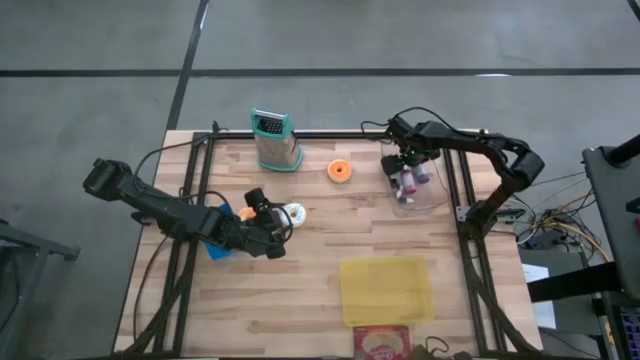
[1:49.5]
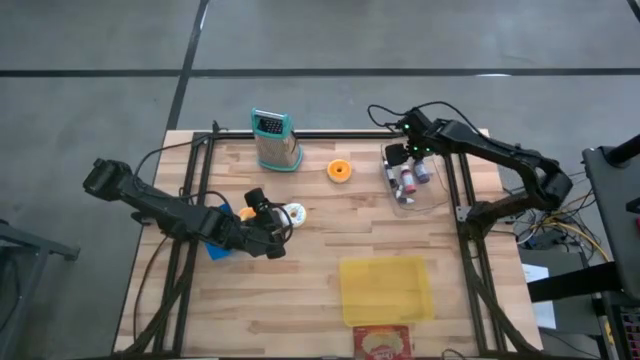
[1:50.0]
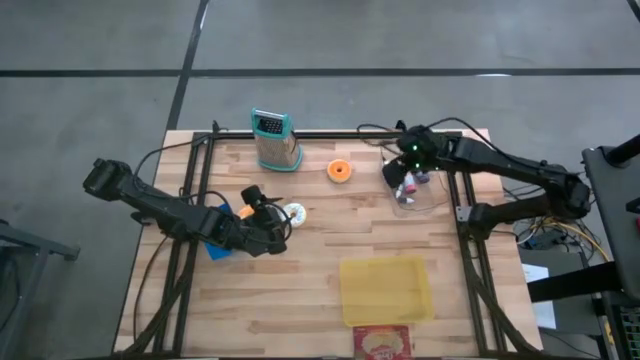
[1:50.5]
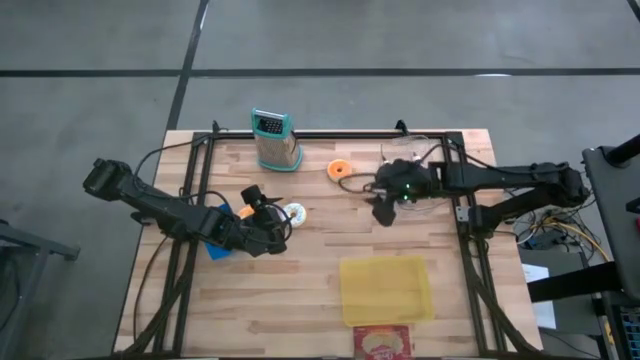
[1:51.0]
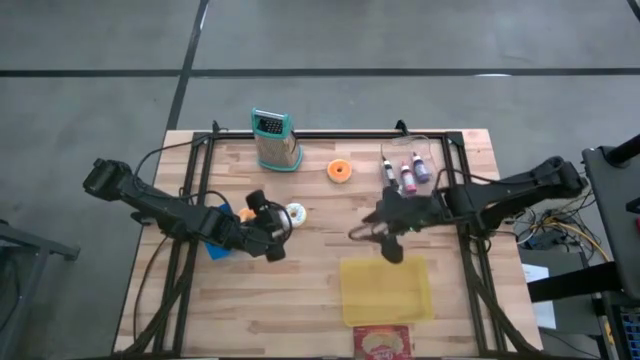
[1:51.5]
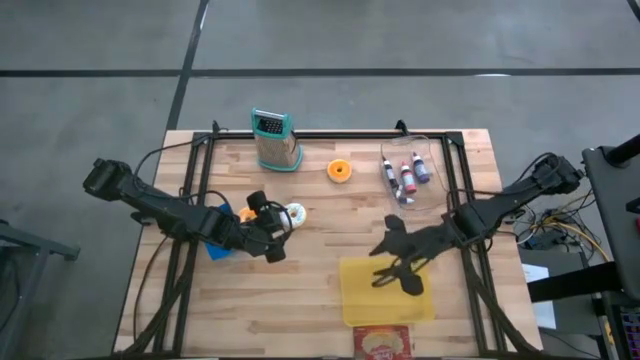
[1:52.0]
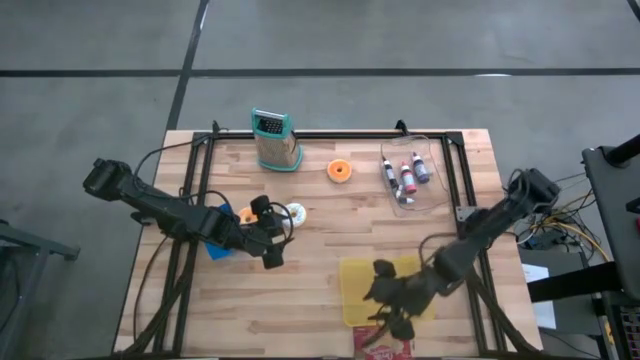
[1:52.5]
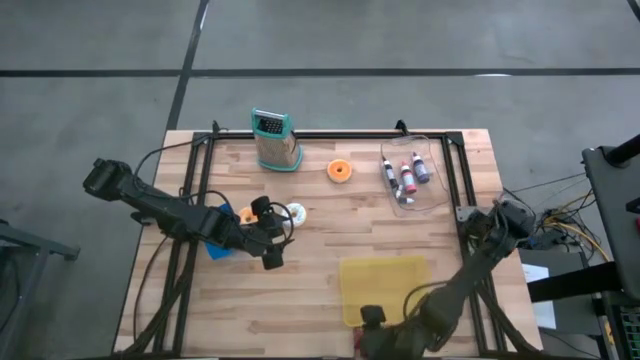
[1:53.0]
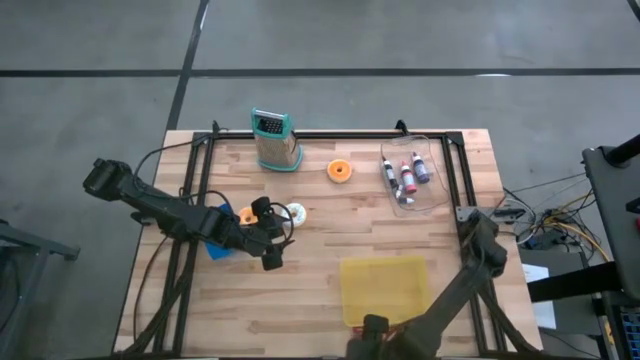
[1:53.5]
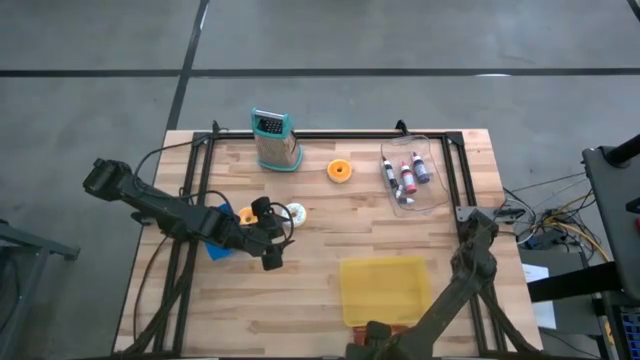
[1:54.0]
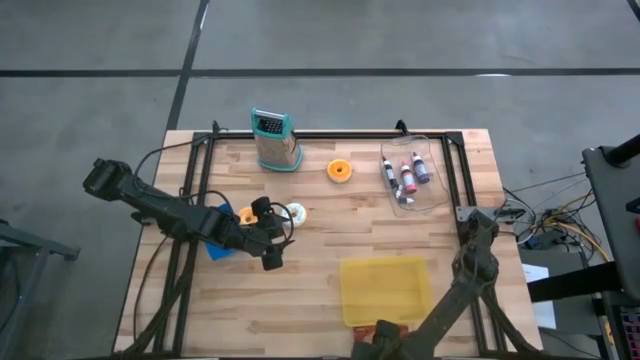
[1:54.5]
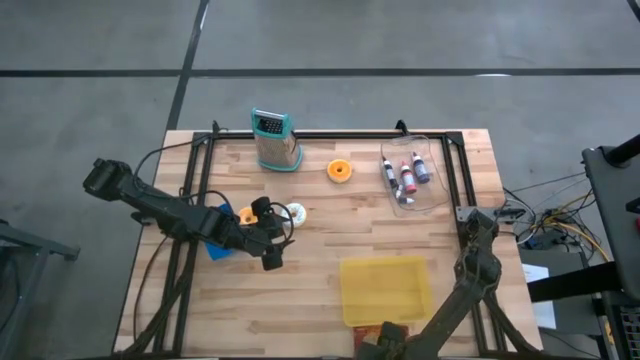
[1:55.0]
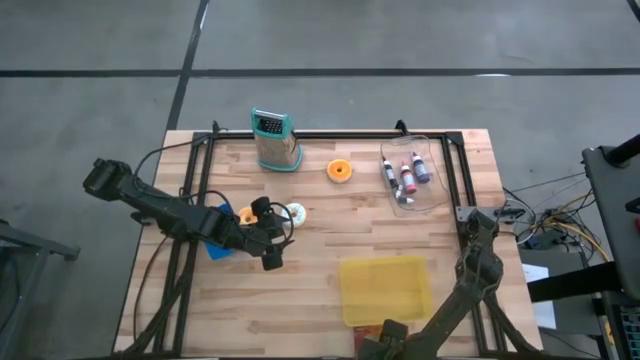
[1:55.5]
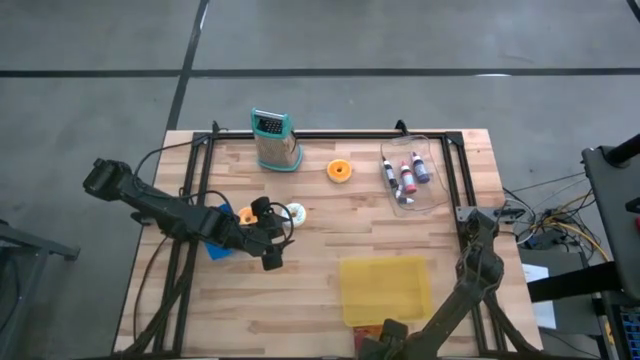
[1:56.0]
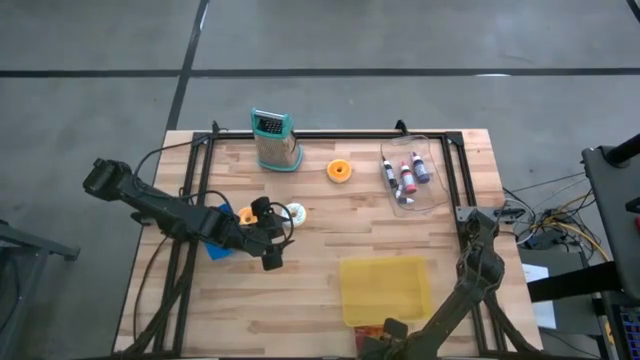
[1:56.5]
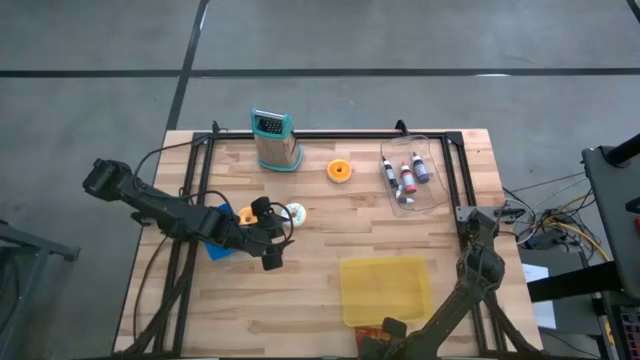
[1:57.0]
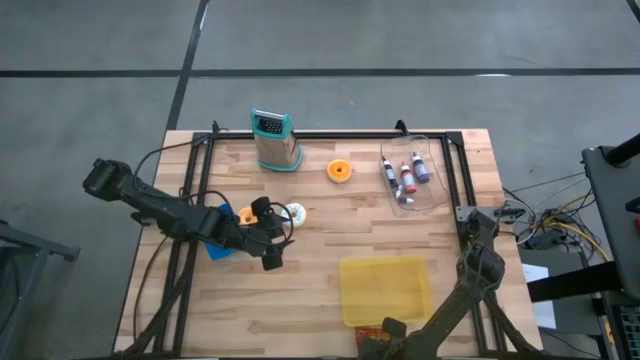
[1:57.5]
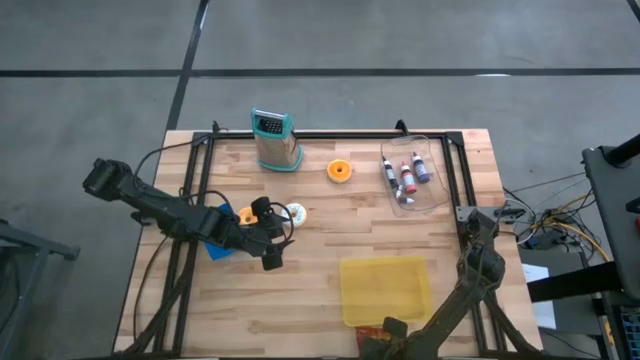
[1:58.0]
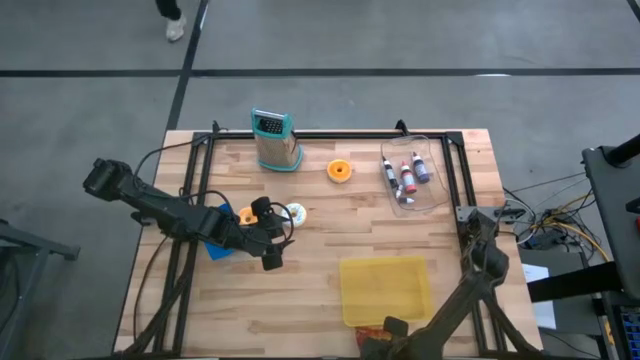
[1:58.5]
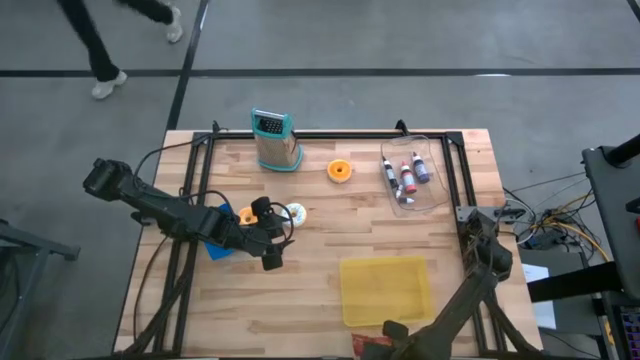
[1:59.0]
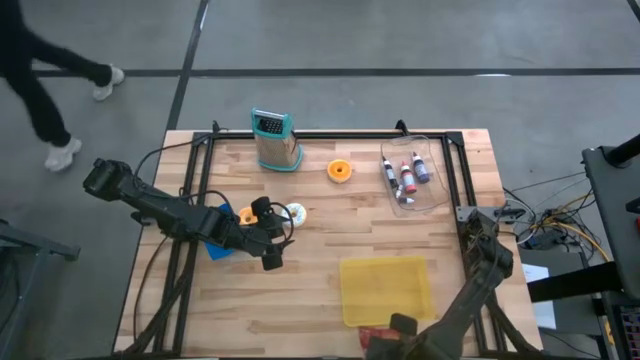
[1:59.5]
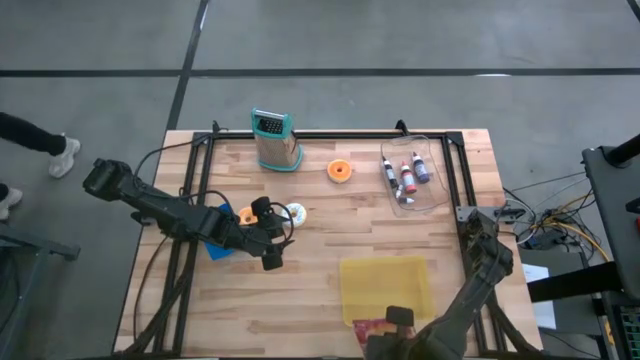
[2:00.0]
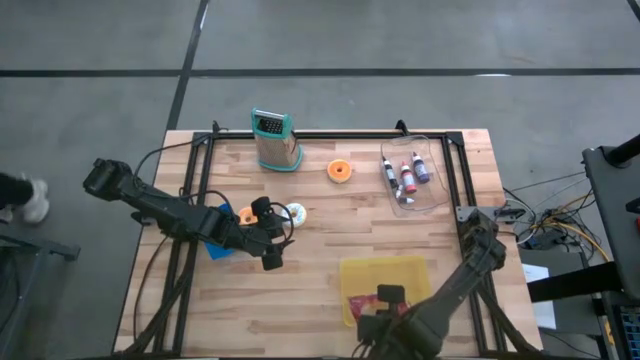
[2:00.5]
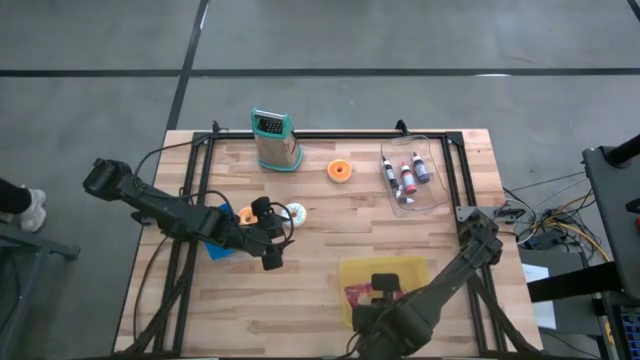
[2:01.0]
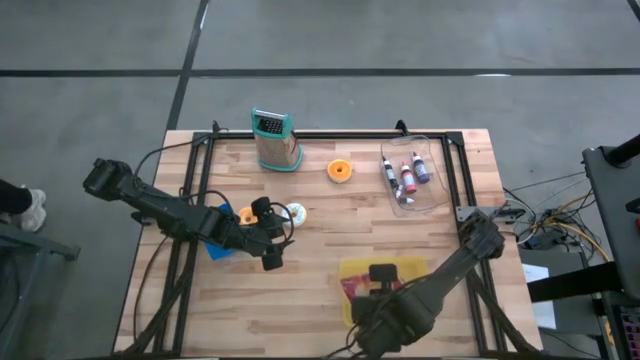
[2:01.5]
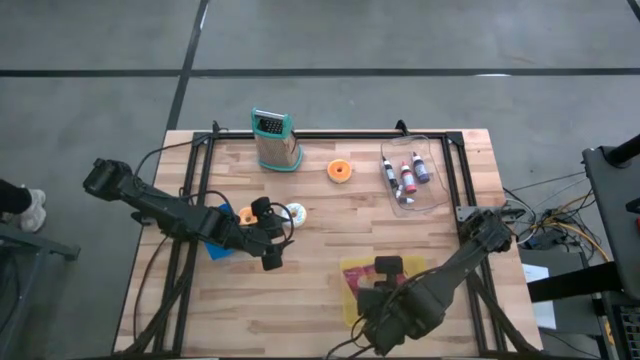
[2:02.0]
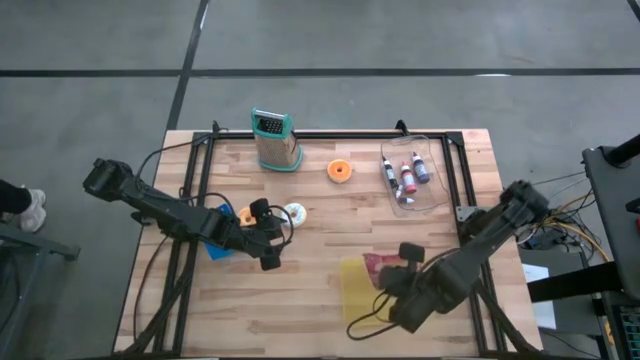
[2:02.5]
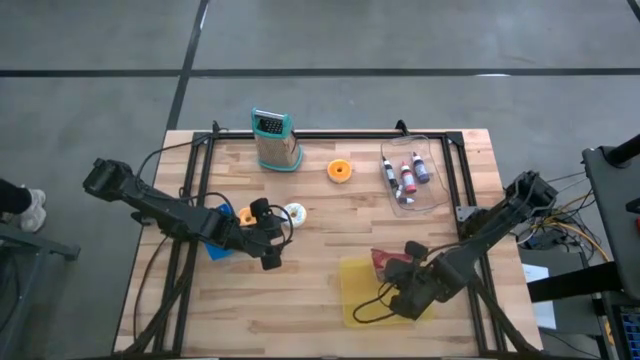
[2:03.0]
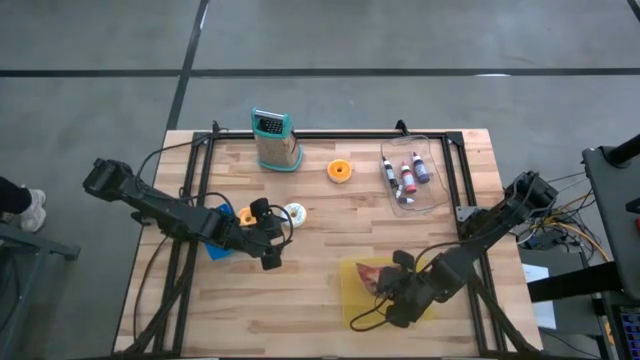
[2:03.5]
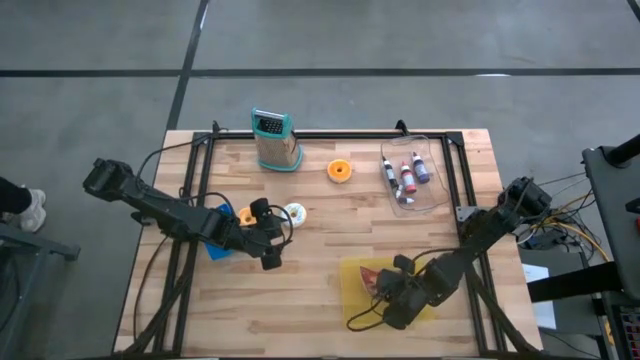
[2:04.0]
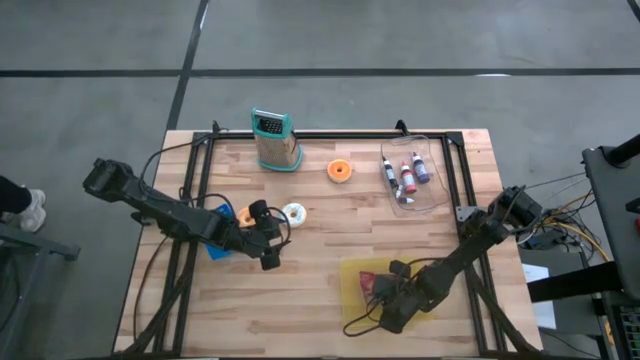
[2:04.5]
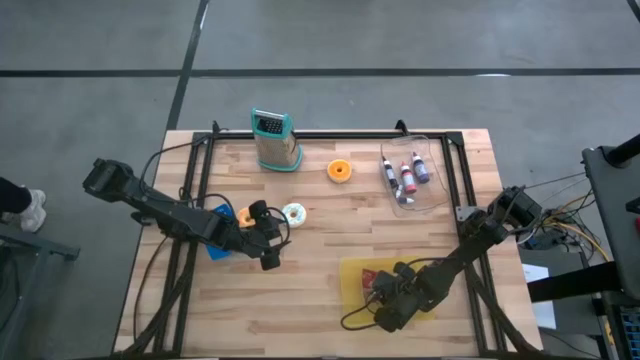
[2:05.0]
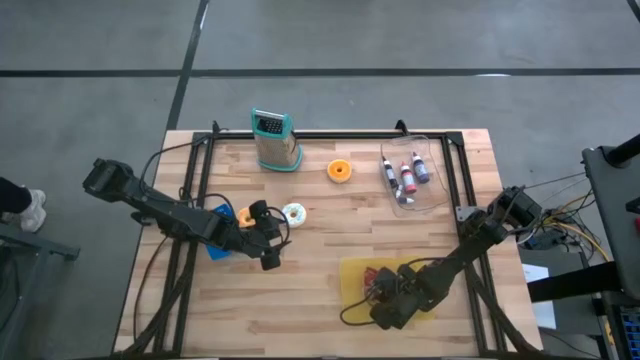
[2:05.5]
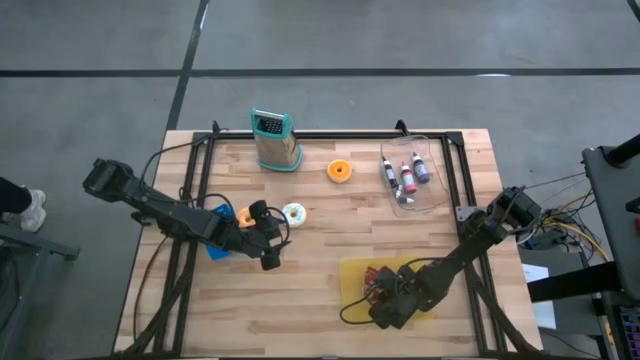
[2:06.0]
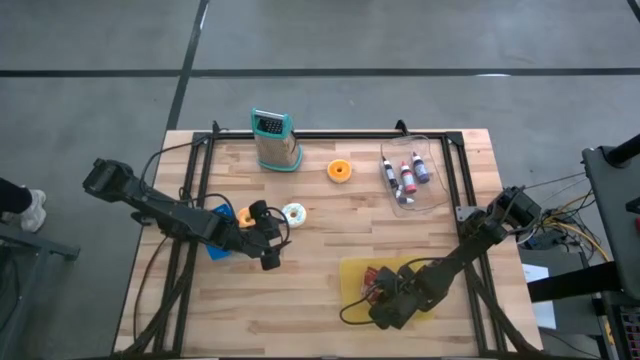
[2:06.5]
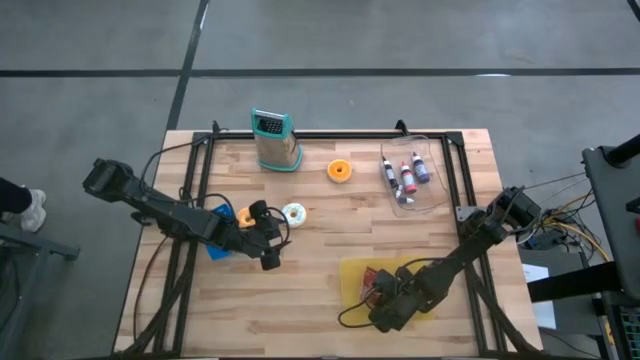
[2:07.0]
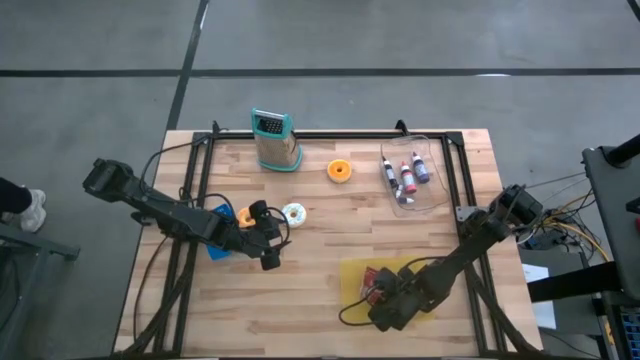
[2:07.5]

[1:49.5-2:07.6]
Task: Pick & Place Food Item
Put the popcorn bag into the yellow bin

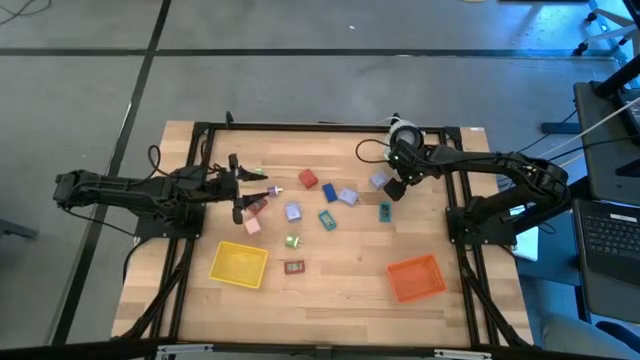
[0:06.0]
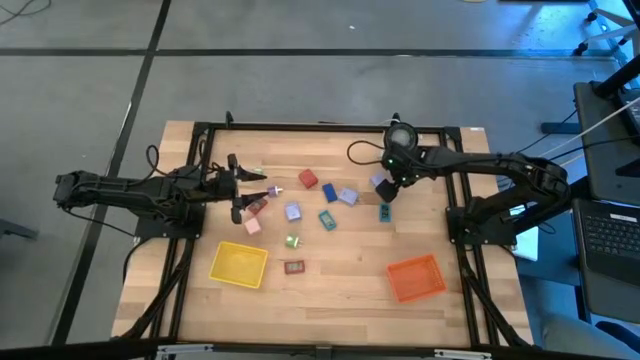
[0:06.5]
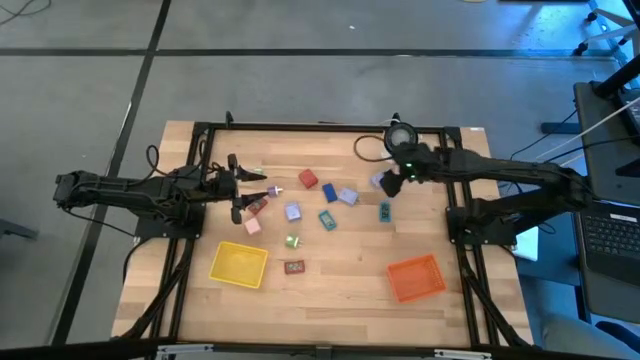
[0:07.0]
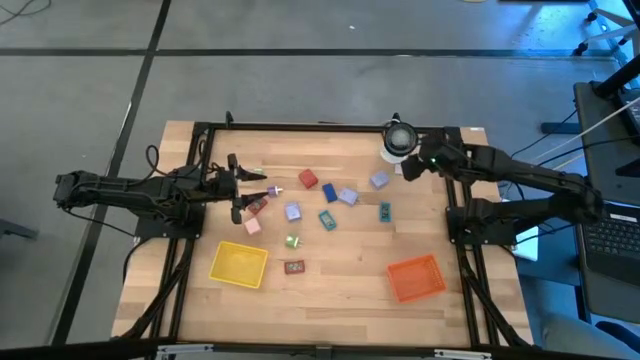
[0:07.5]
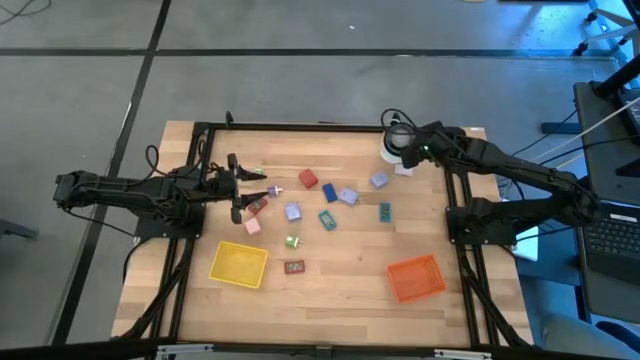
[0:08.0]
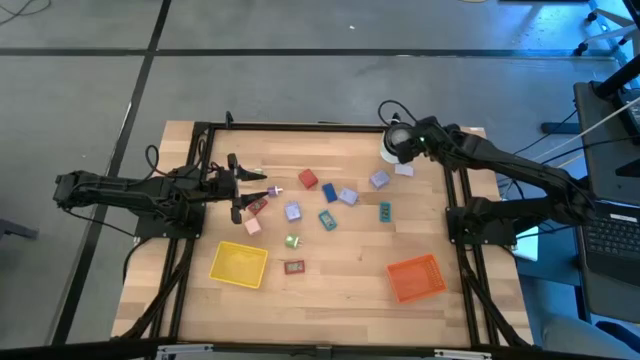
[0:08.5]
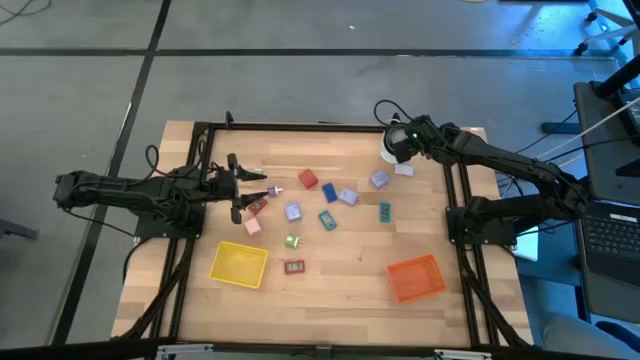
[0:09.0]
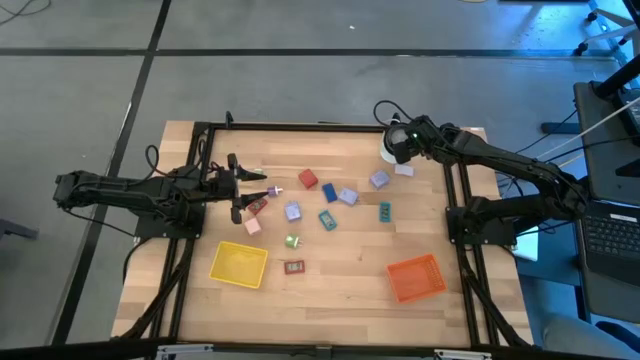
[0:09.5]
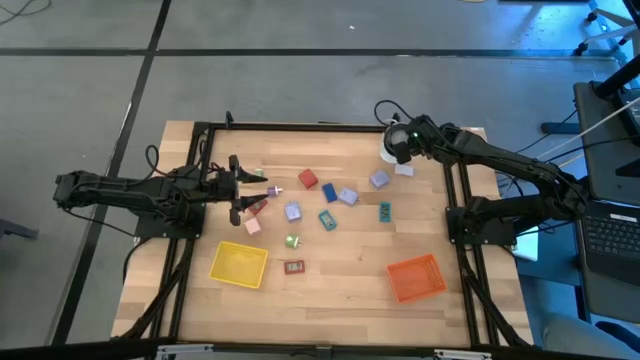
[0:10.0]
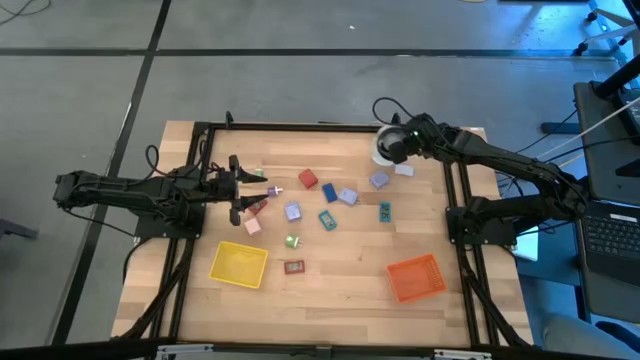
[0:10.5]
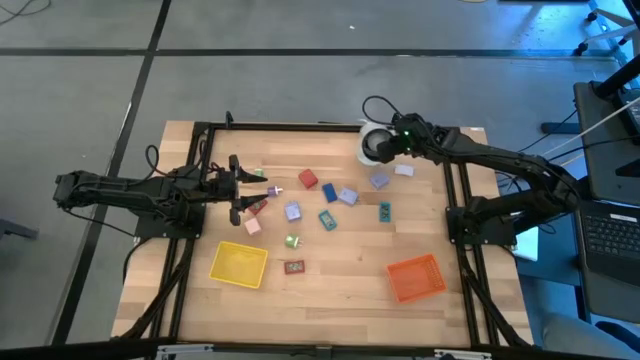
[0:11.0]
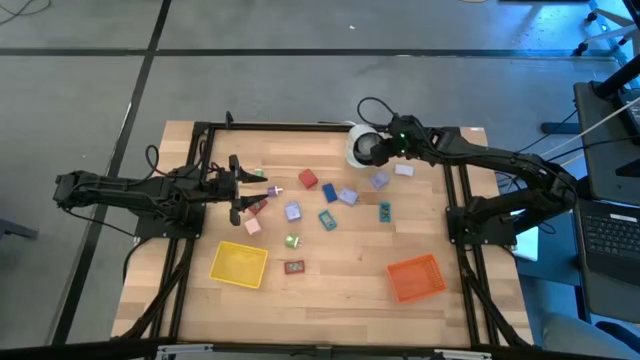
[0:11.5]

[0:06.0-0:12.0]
Task: Pick & Place Office items
Adjust the white lamp
